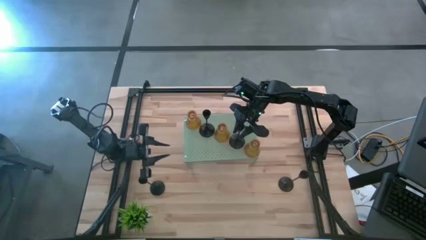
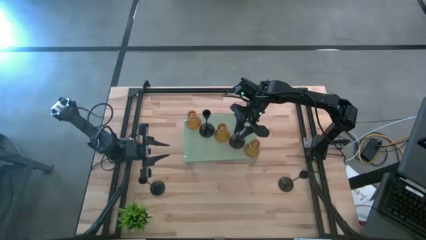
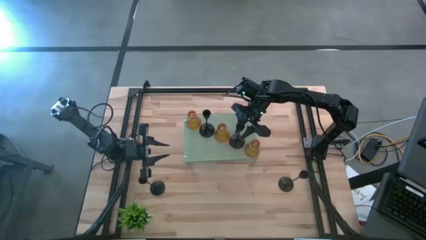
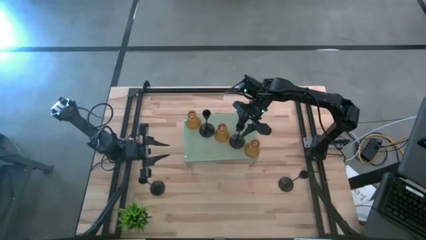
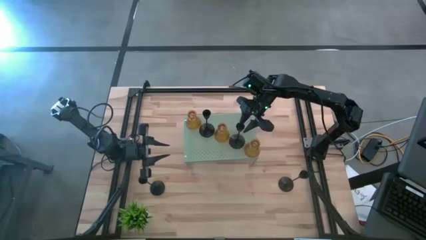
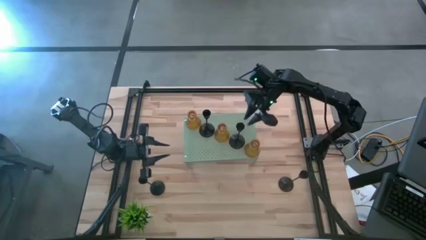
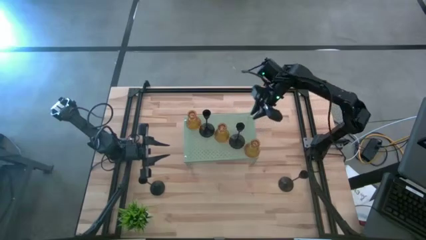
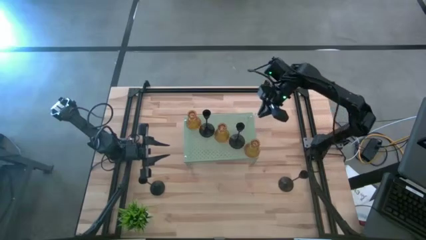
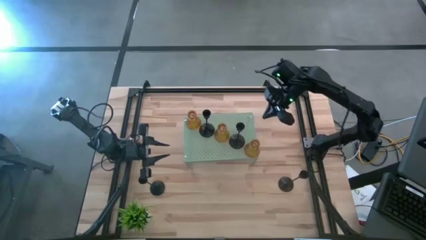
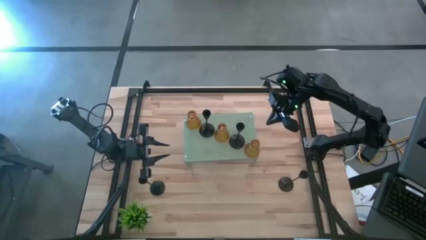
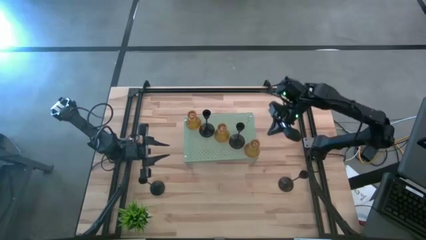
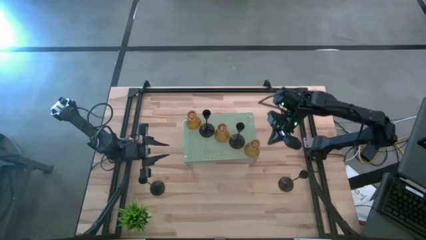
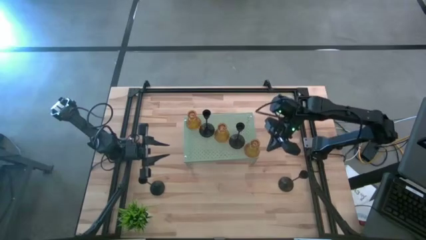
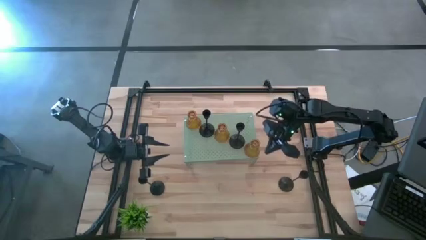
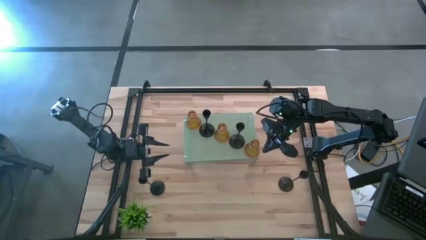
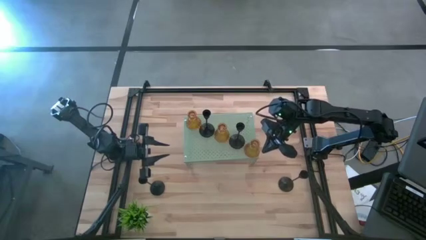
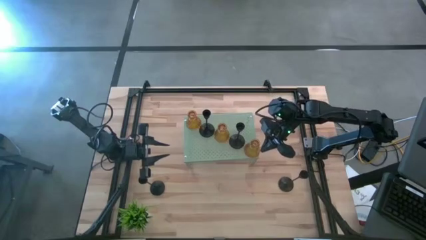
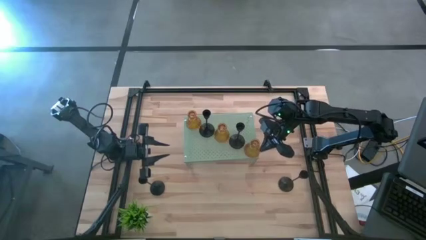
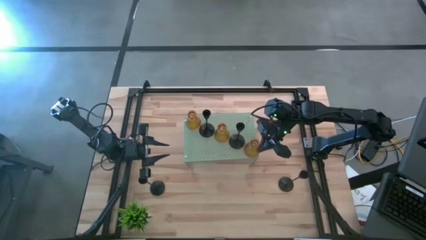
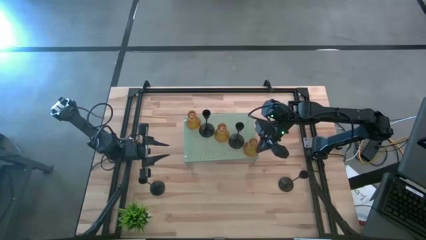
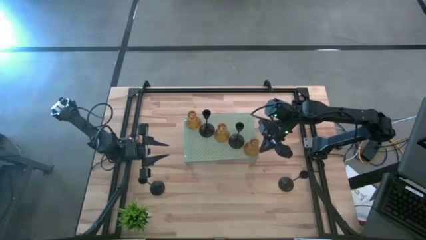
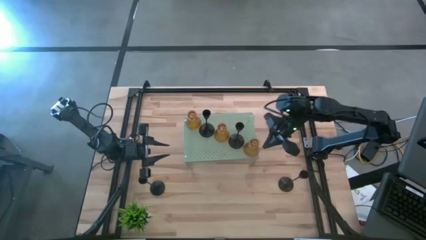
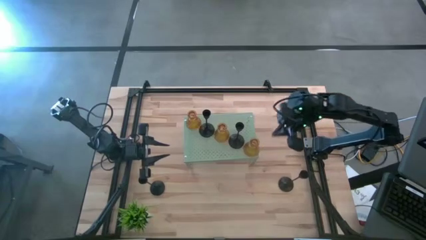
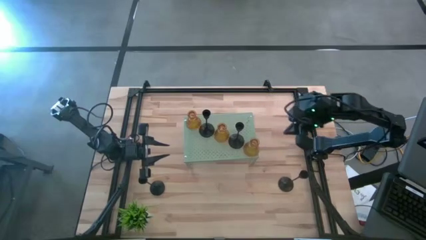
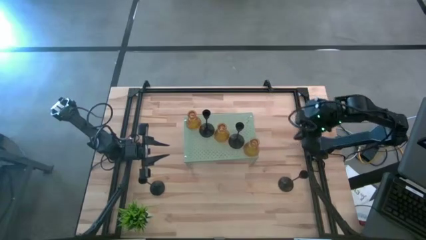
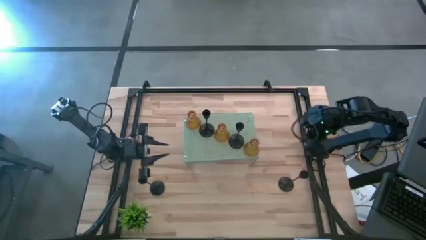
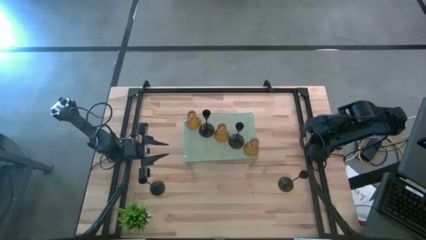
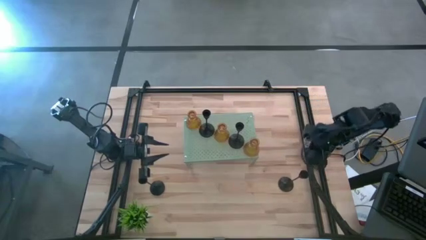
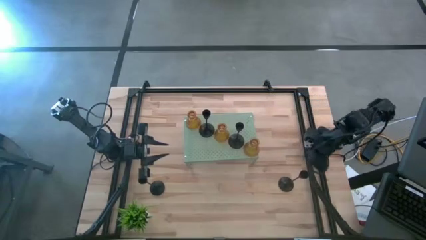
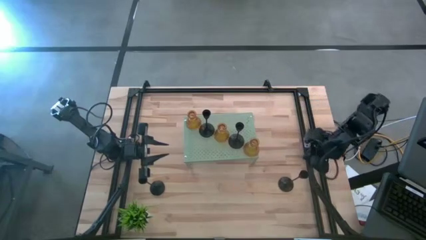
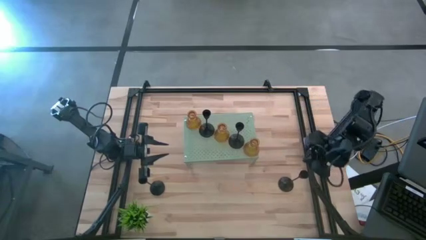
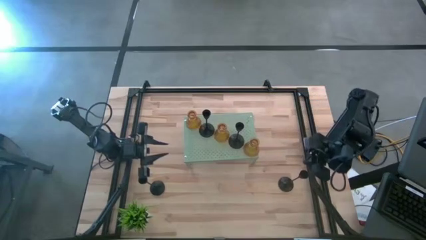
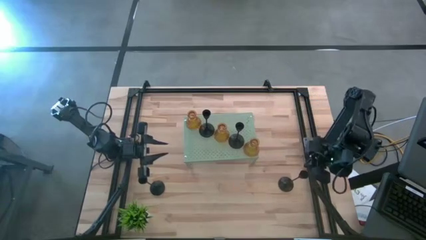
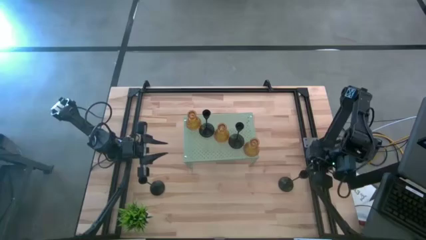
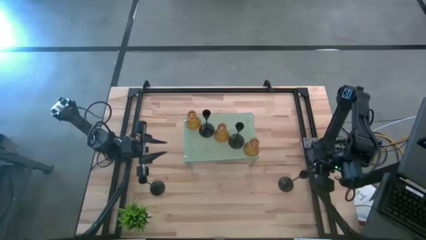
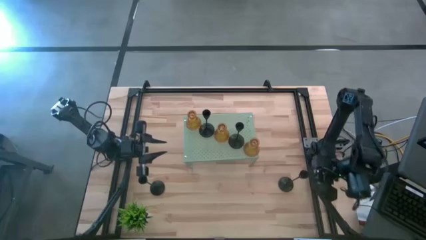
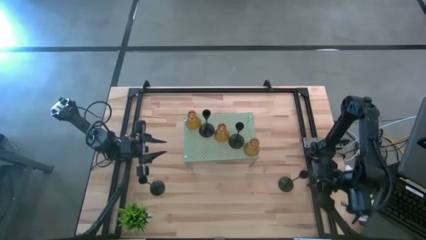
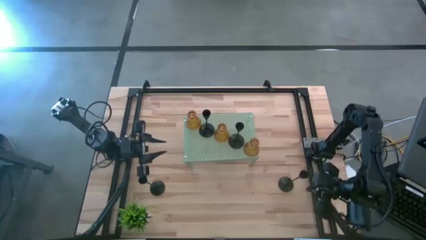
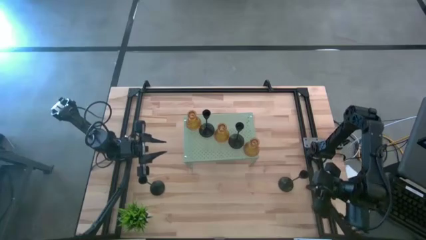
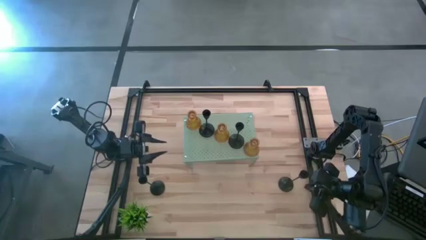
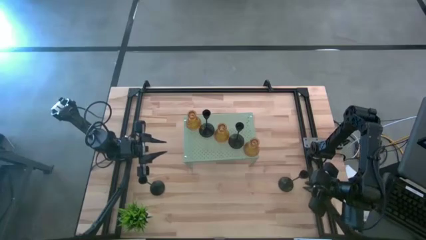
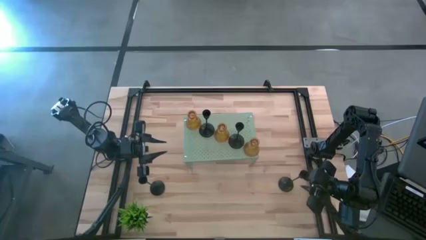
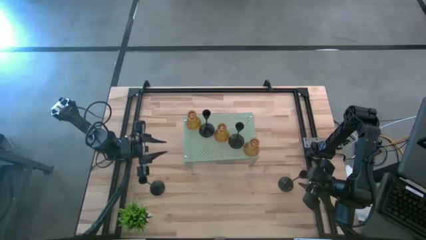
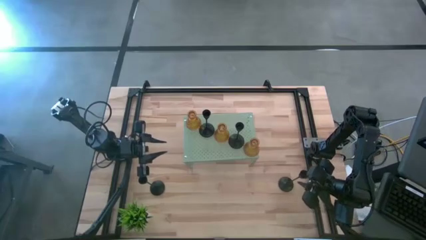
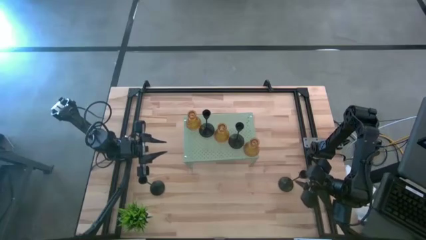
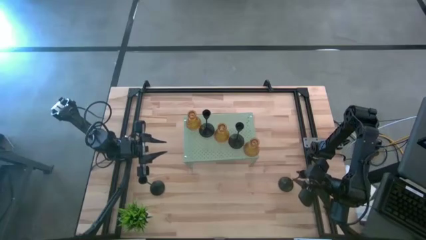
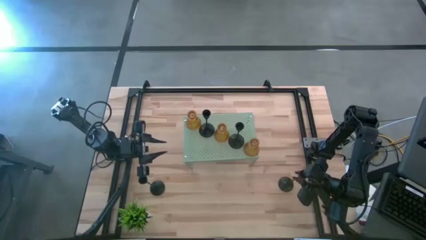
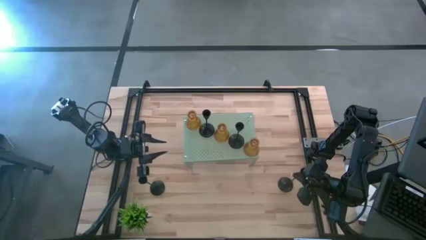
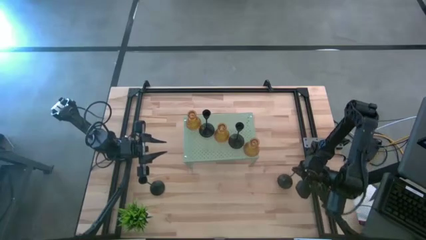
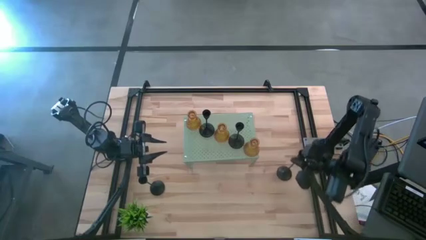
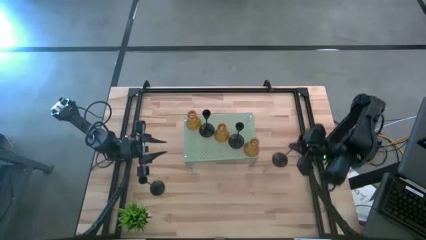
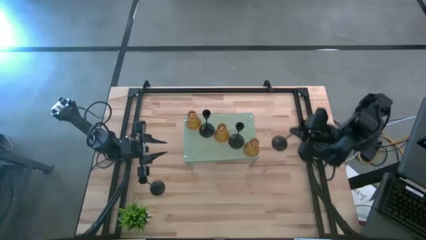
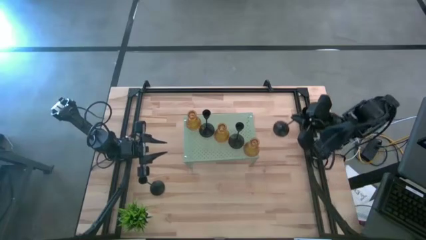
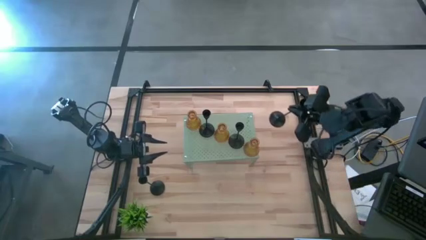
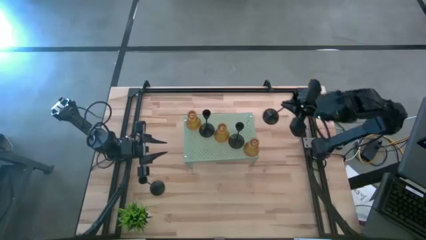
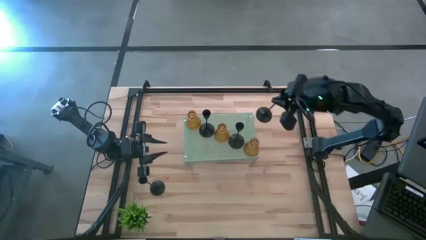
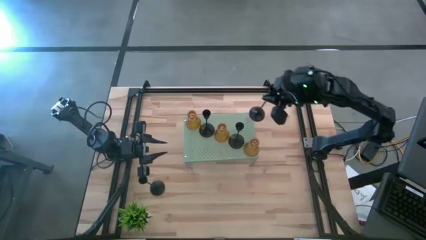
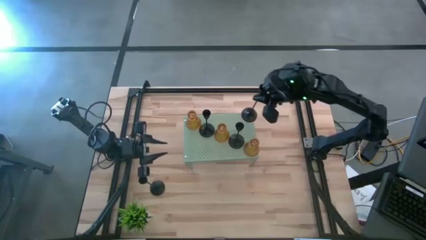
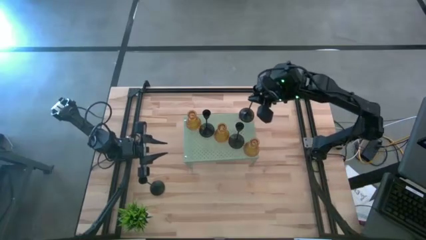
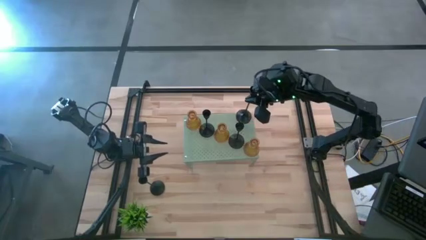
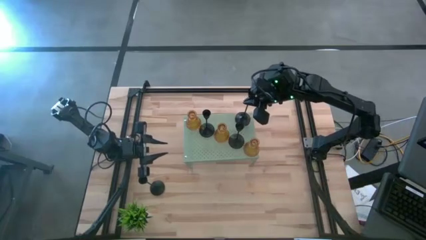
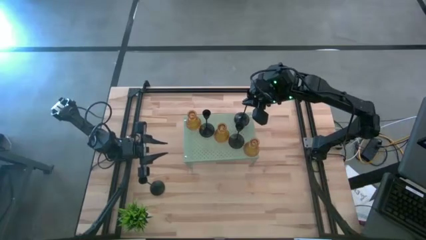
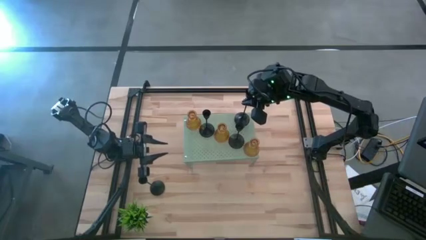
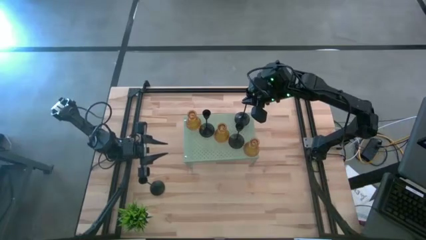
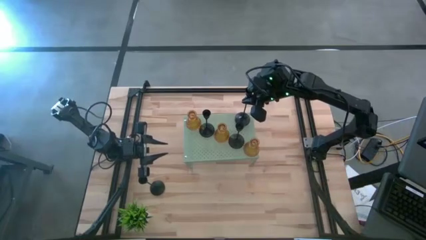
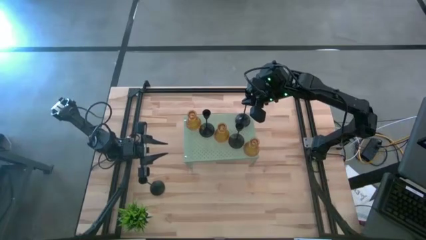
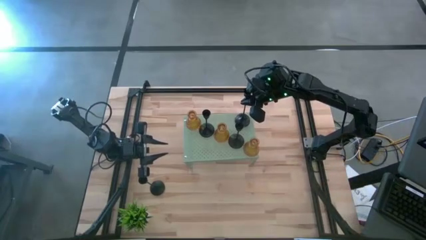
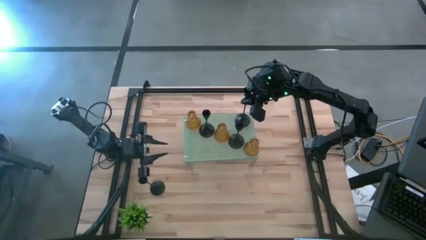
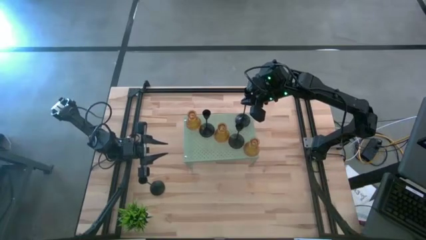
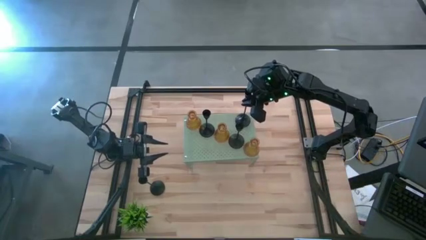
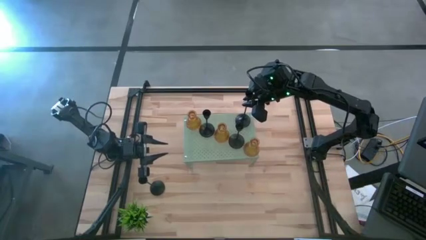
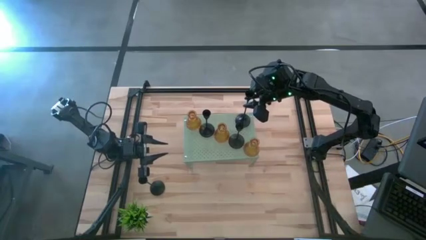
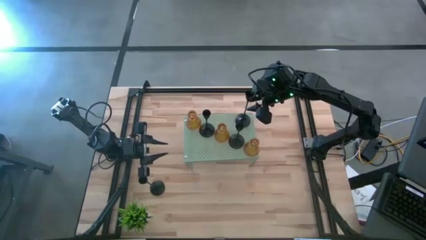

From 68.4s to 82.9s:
Task: Pick & Place candle stick holders
Put the black candle holder on the shelf
